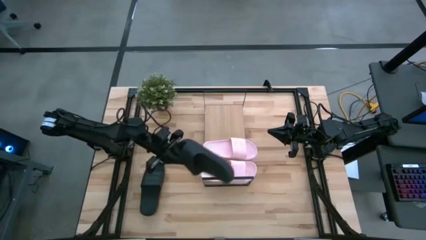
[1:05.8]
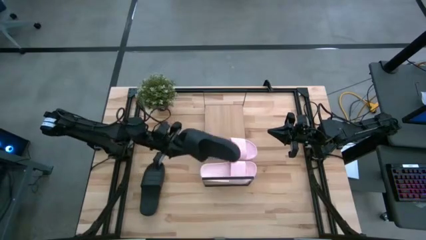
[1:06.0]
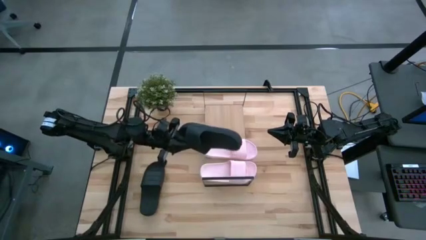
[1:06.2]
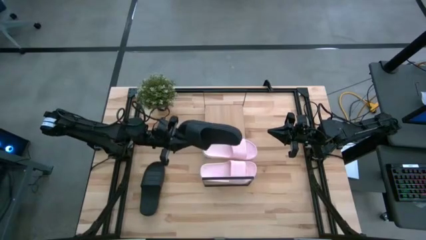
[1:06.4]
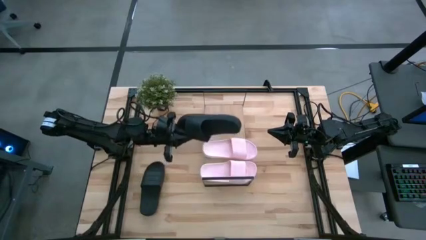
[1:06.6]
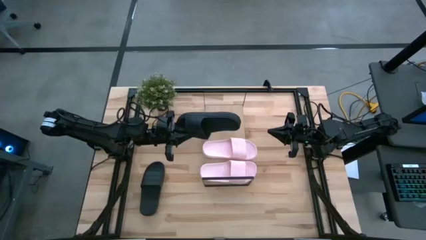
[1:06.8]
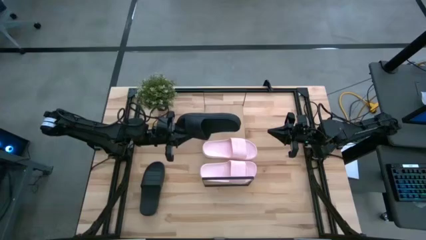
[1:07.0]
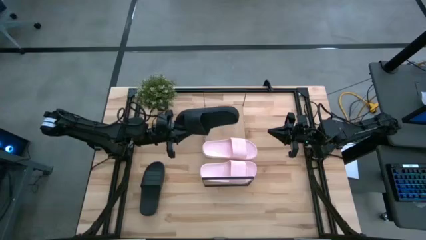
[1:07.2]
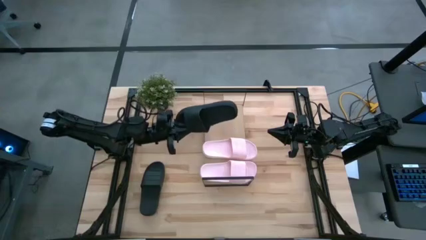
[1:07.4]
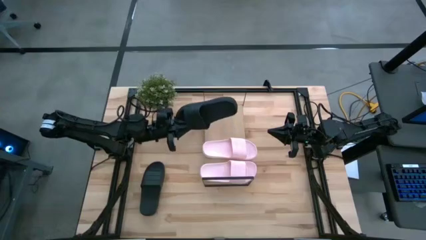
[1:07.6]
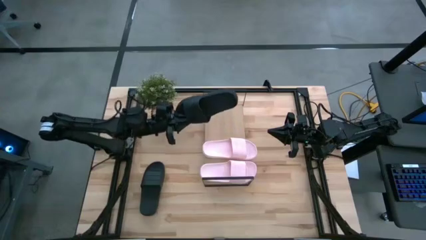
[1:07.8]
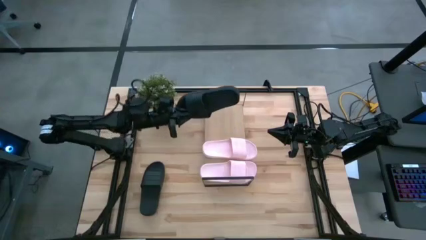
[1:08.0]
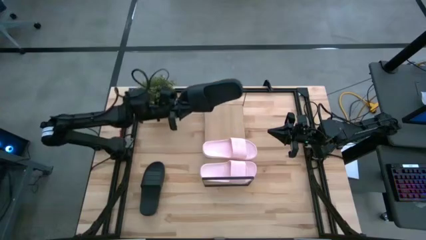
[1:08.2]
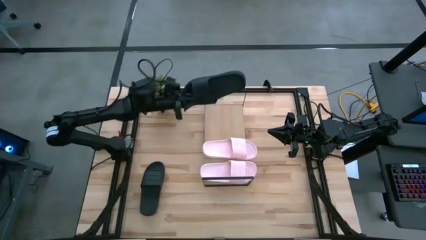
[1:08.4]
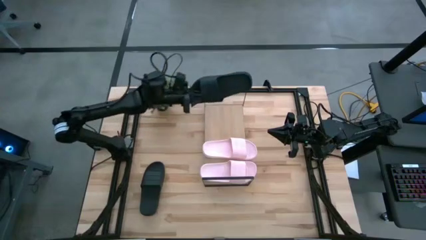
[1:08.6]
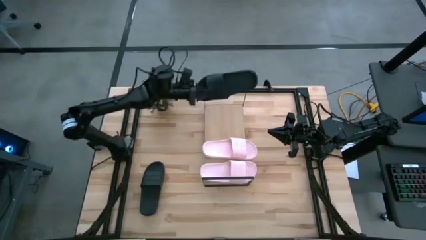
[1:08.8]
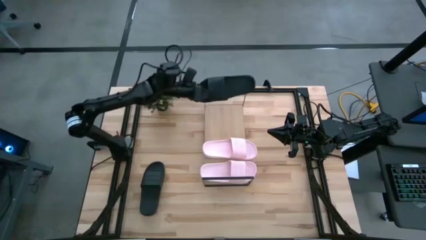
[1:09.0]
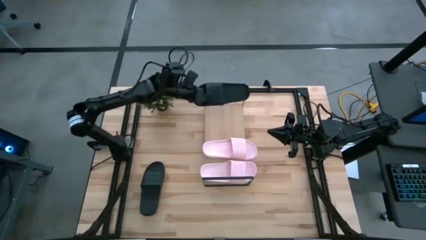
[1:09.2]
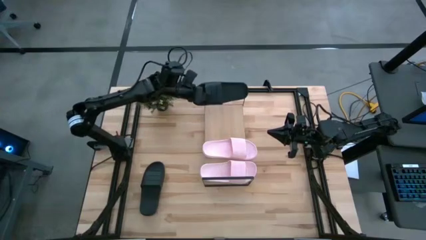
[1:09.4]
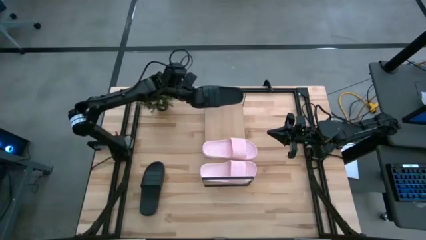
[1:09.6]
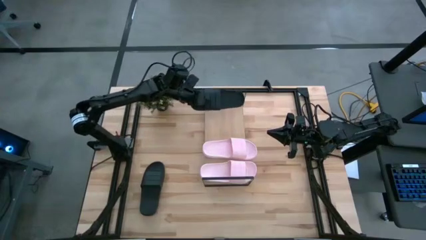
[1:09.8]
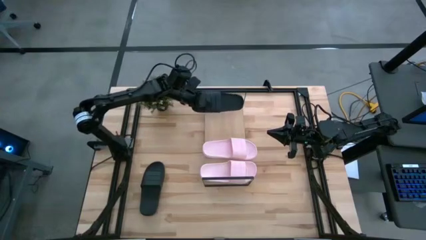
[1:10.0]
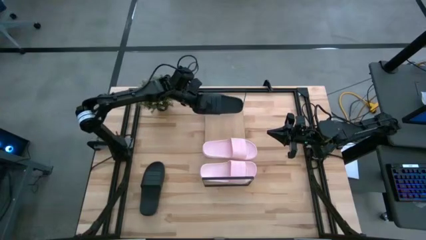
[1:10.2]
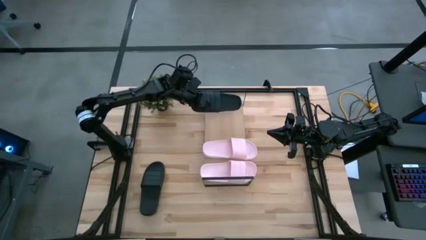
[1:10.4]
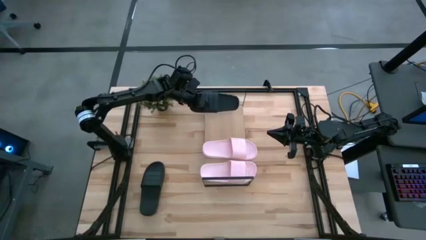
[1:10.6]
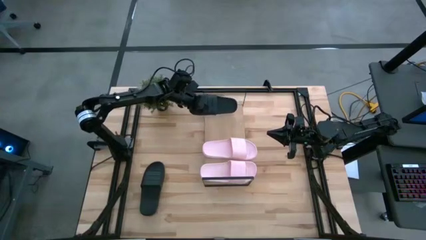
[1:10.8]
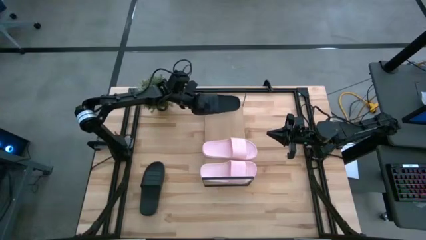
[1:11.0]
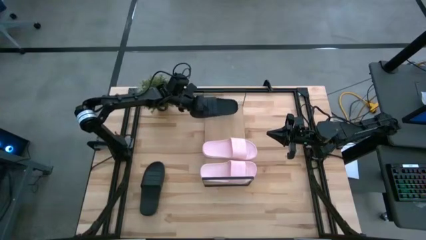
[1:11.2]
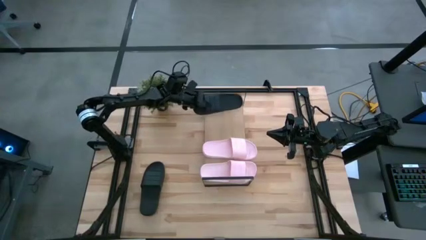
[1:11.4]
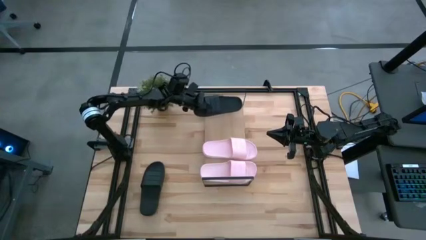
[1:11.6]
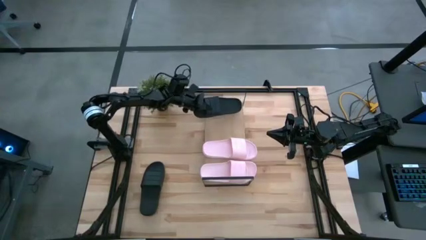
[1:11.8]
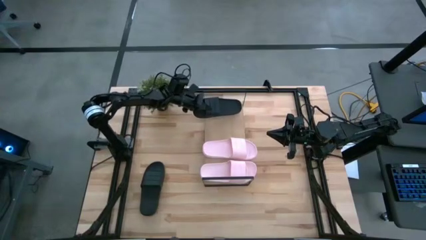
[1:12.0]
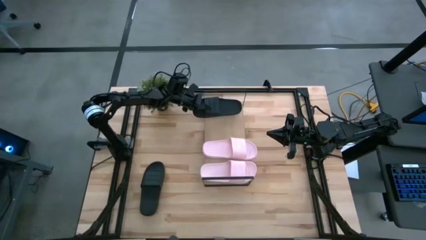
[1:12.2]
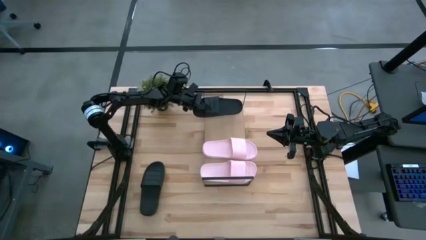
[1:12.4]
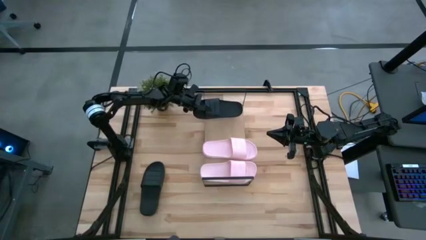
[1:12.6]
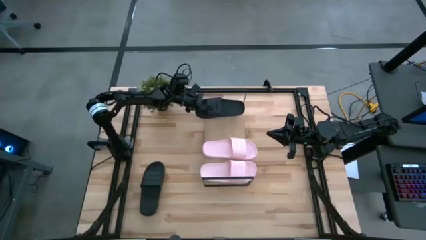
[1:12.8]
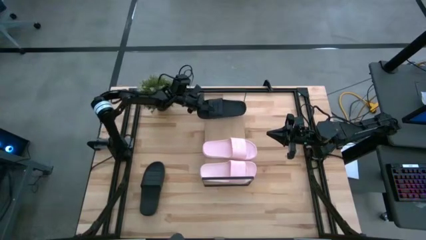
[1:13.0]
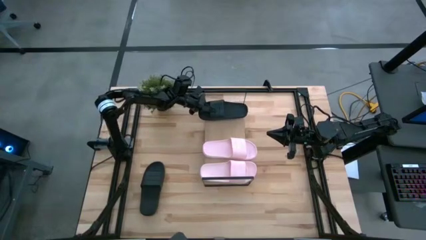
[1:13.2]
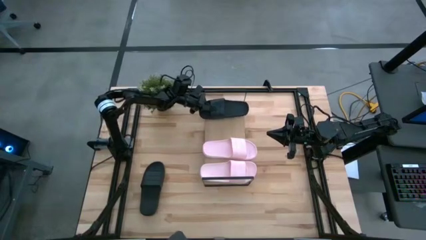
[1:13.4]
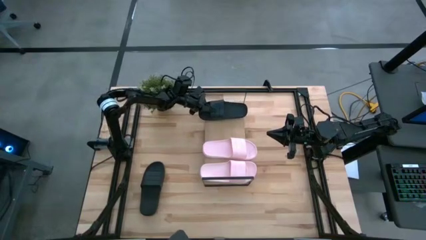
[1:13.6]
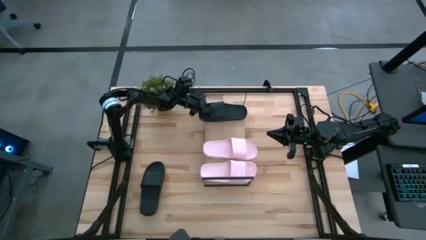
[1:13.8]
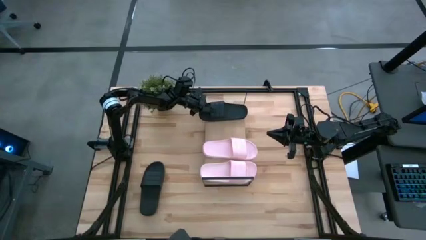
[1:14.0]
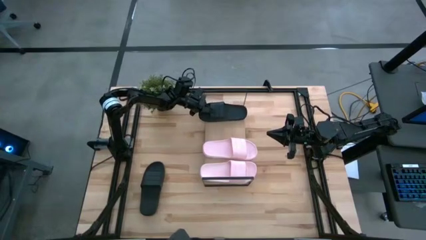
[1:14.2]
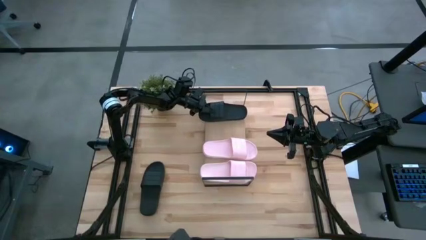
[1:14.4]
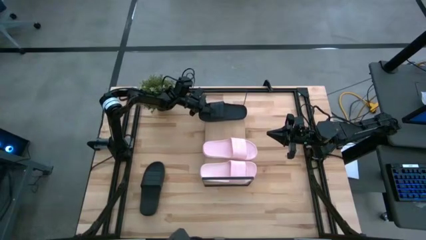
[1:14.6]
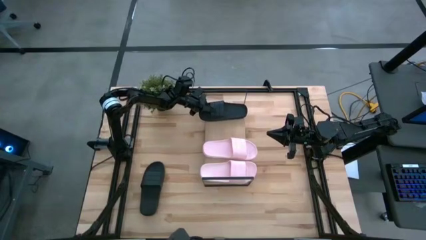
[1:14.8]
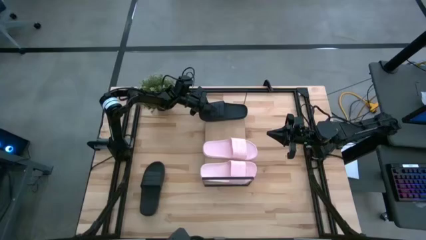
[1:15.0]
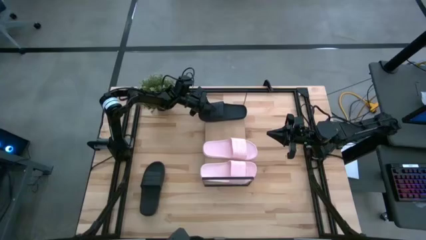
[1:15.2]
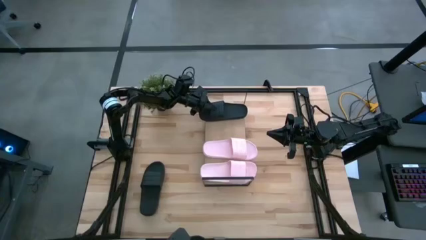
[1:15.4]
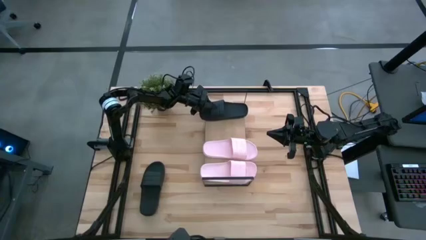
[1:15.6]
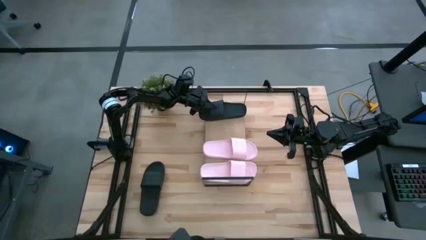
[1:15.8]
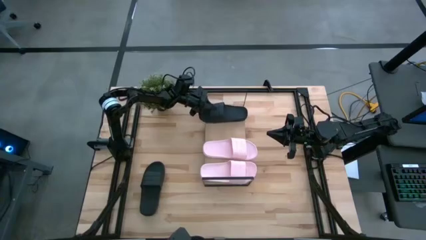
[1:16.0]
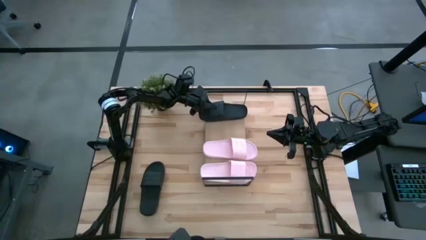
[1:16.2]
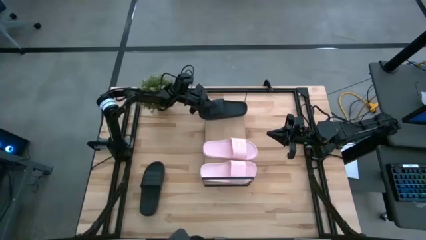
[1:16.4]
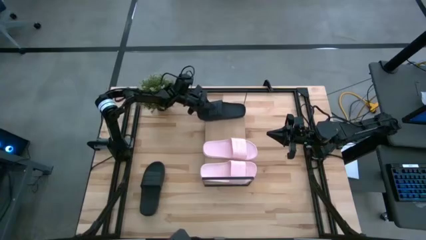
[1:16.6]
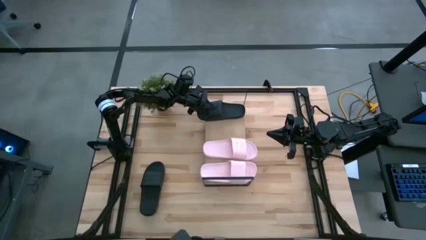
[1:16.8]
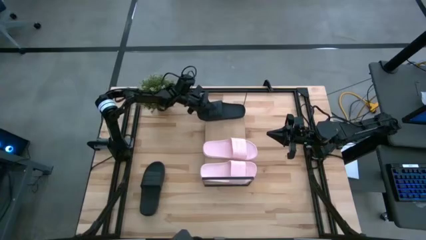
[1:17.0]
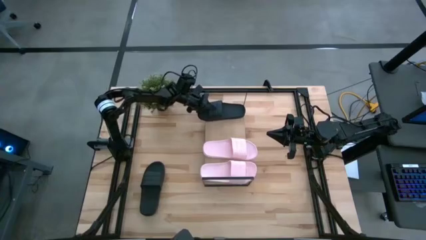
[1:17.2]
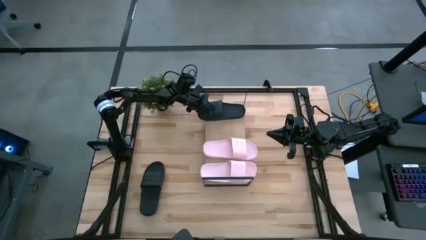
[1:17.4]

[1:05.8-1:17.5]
Task: Pick and place slides into the shelf
Put the right black slide on the shelf
